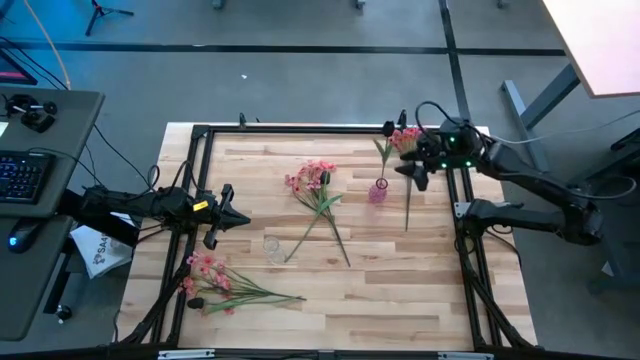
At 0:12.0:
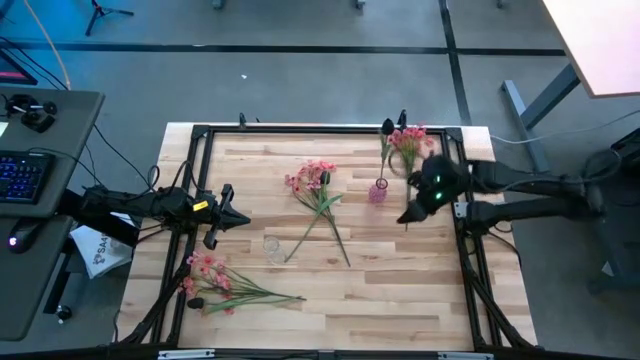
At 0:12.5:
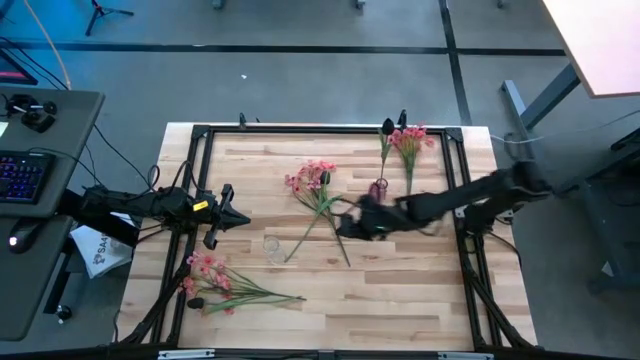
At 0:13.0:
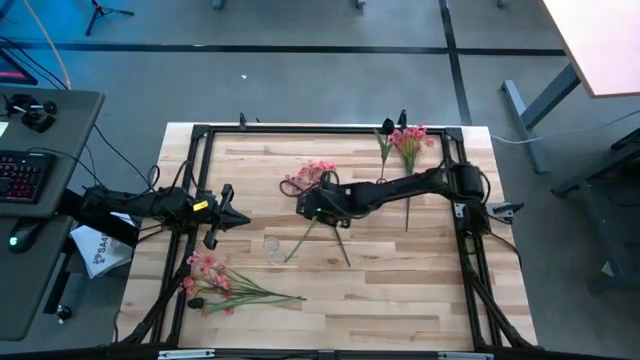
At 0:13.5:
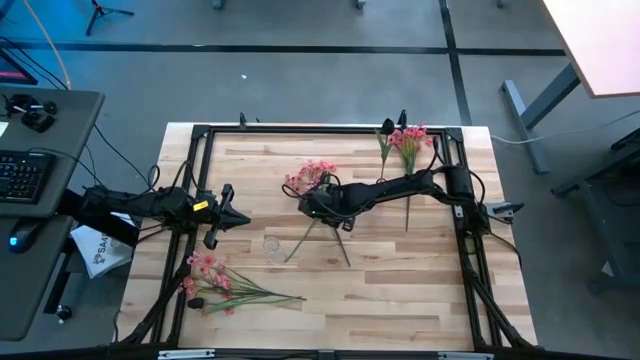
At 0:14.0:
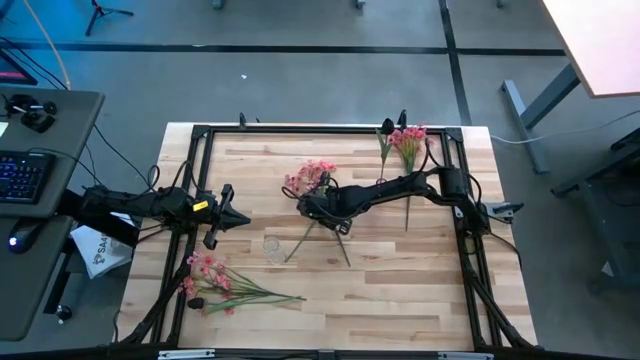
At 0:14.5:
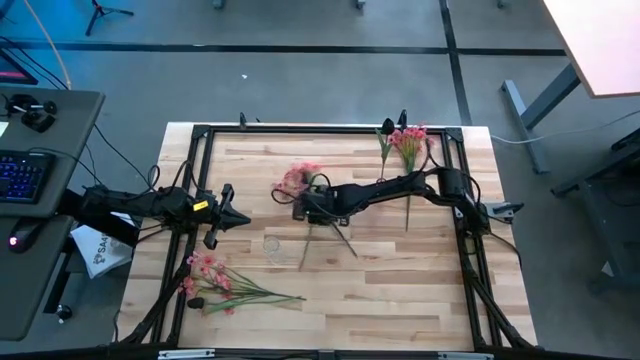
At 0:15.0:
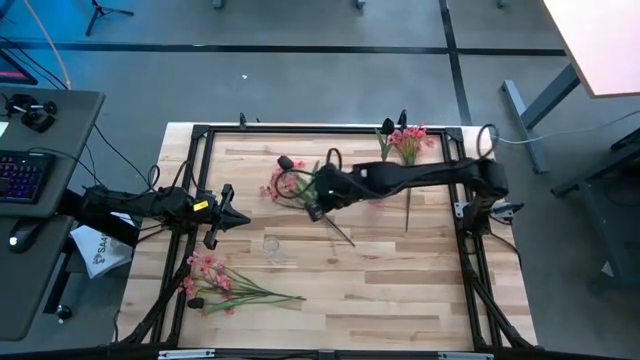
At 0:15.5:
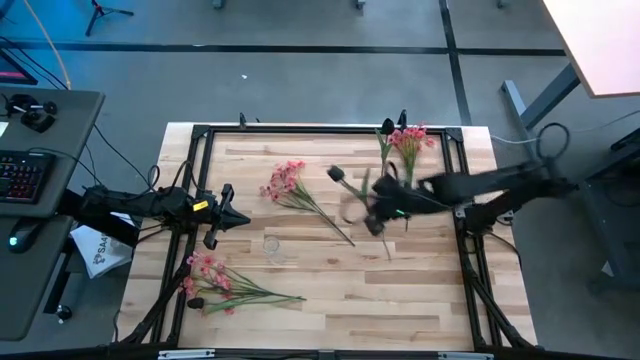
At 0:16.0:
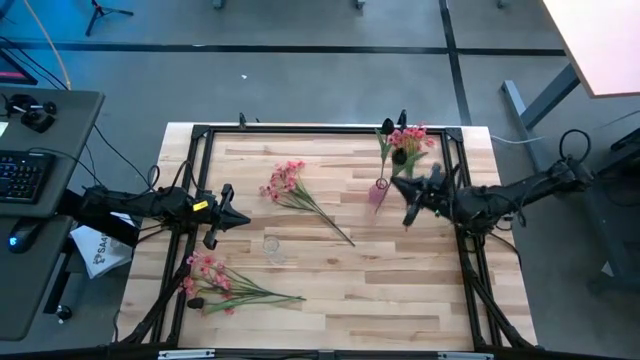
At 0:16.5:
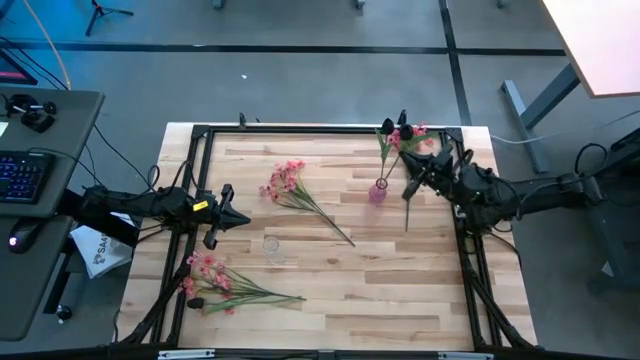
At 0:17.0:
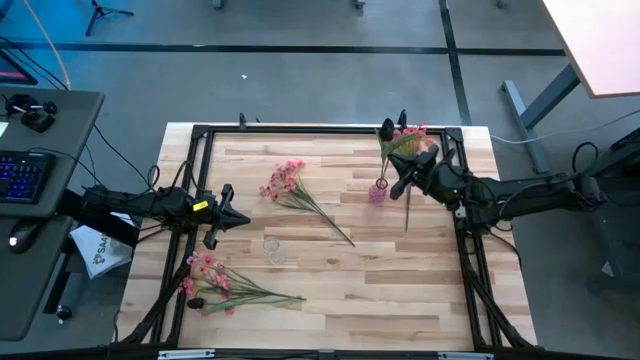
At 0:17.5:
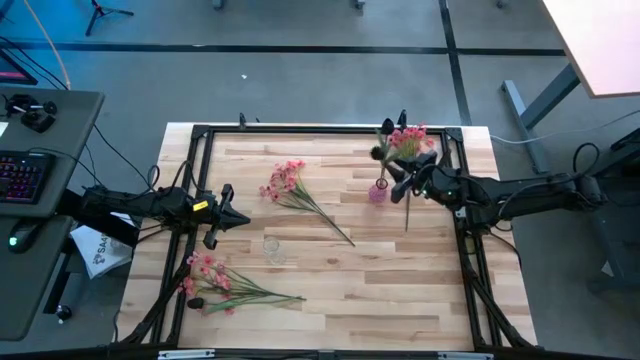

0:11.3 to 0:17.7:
Task: Sort flowers into vase by color
Put the center black tulip into the pink vase

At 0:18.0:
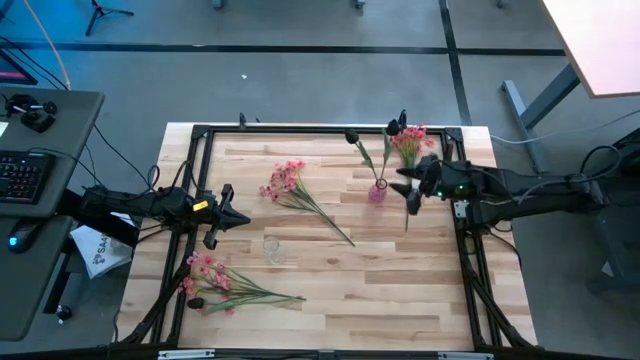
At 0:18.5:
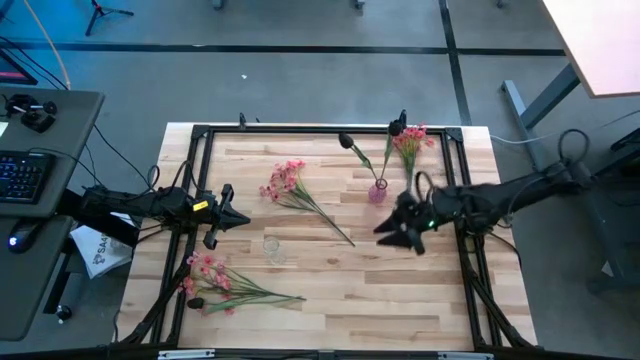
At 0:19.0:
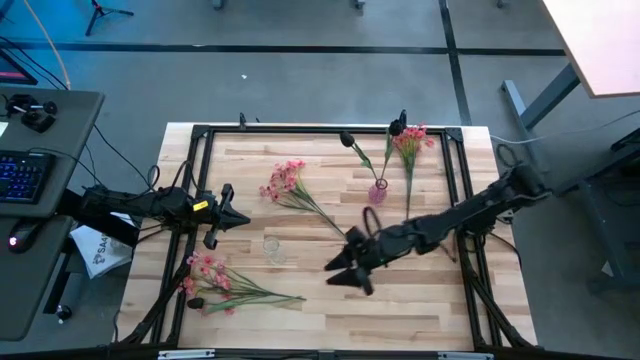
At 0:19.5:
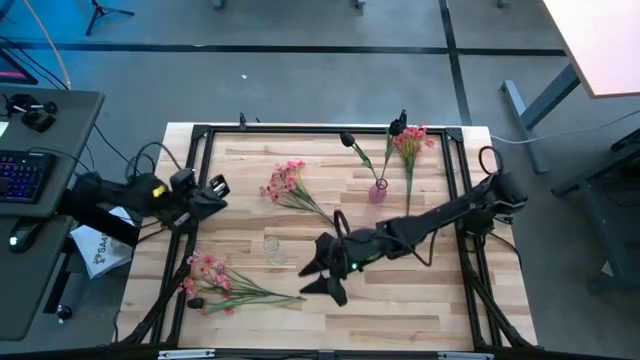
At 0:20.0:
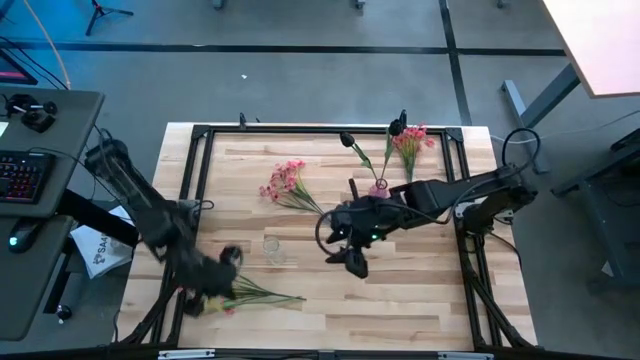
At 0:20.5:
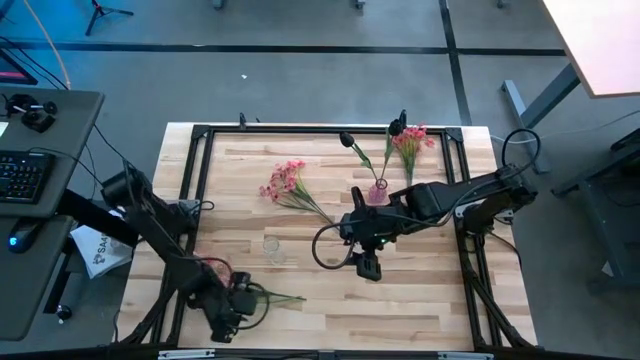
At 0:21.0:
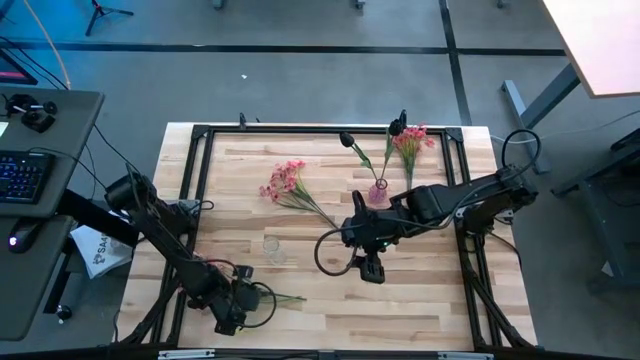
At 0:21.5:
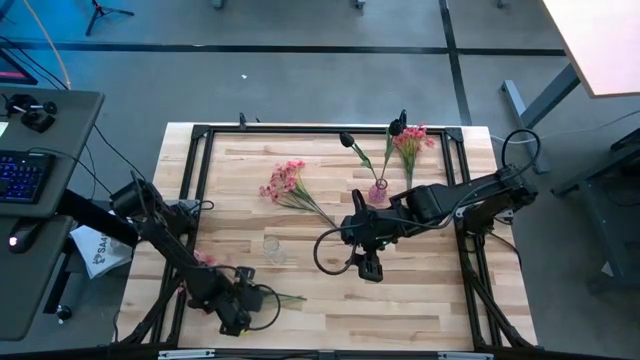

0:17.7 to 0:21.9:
Put the black tulip into the pink vase

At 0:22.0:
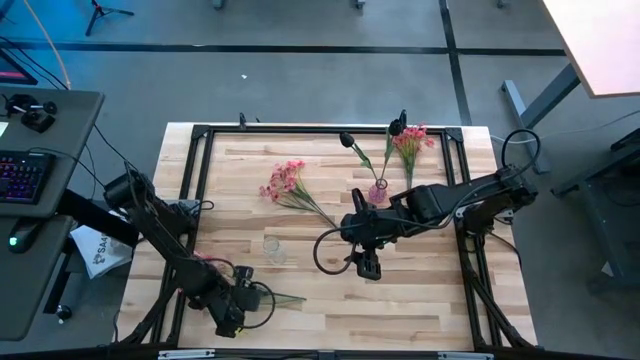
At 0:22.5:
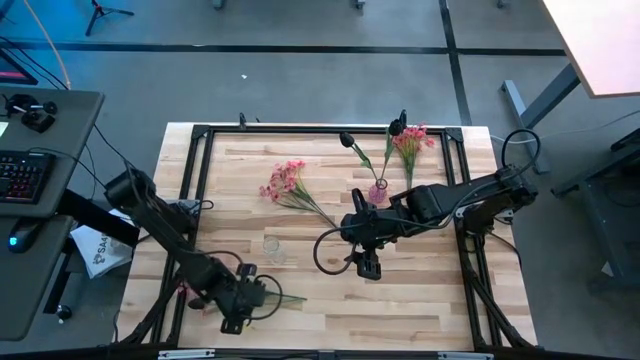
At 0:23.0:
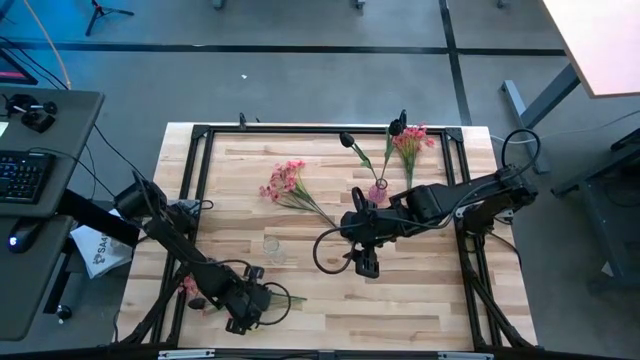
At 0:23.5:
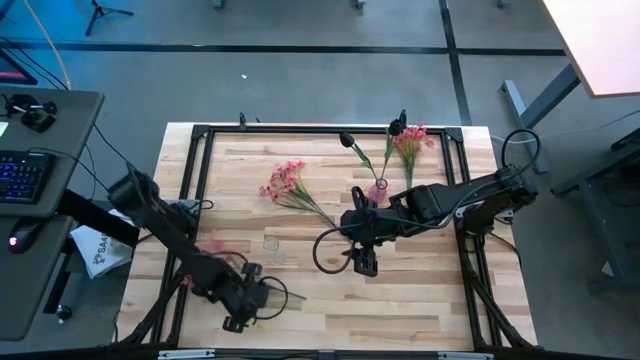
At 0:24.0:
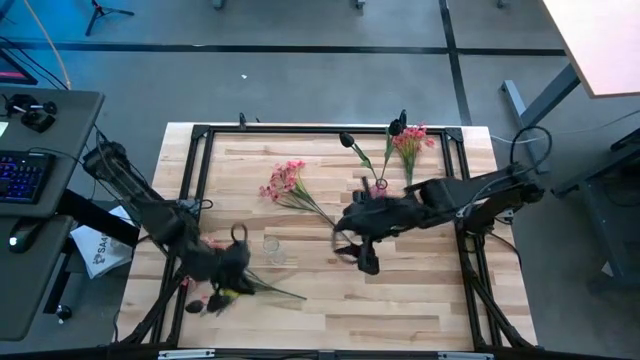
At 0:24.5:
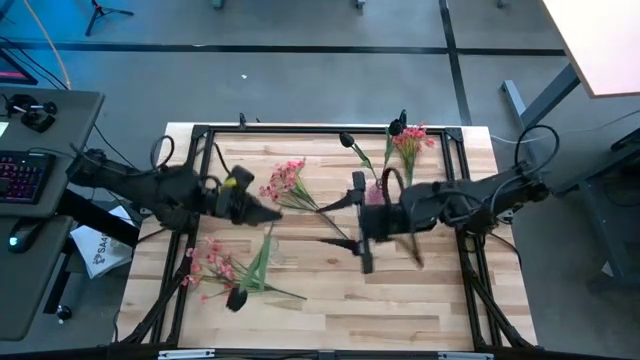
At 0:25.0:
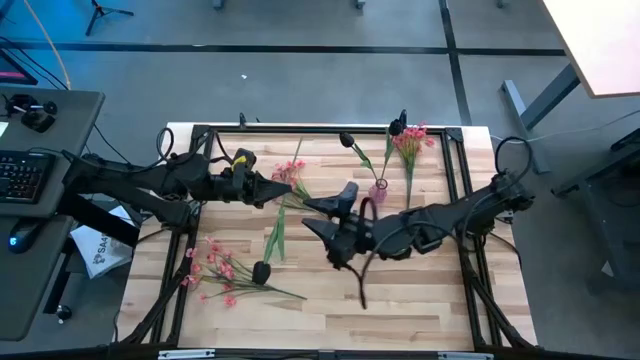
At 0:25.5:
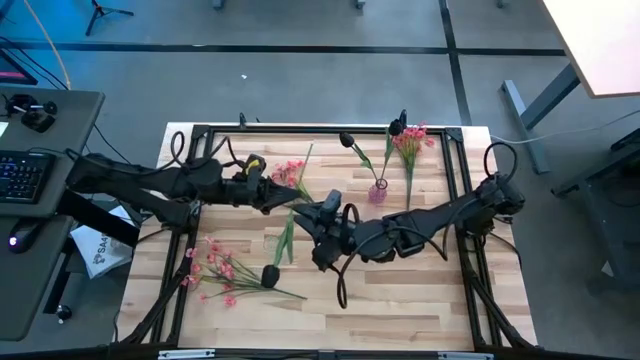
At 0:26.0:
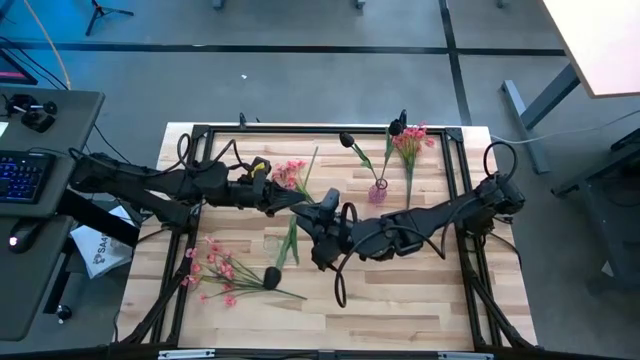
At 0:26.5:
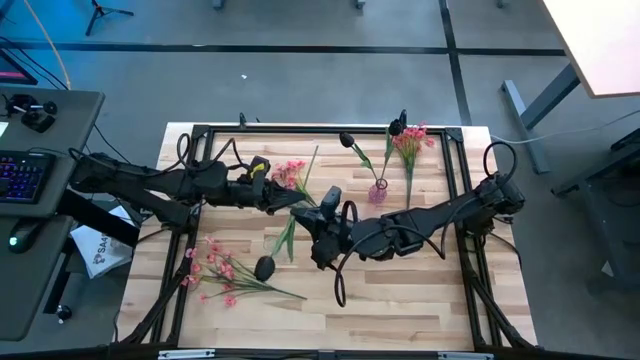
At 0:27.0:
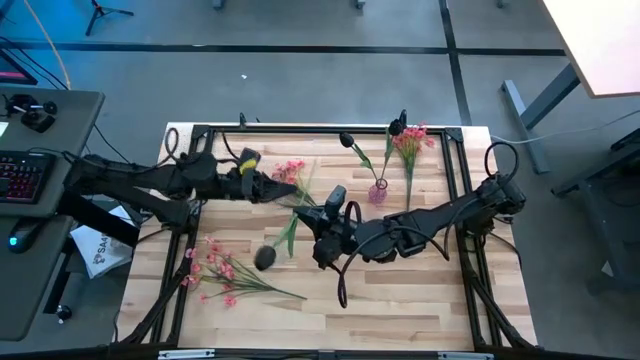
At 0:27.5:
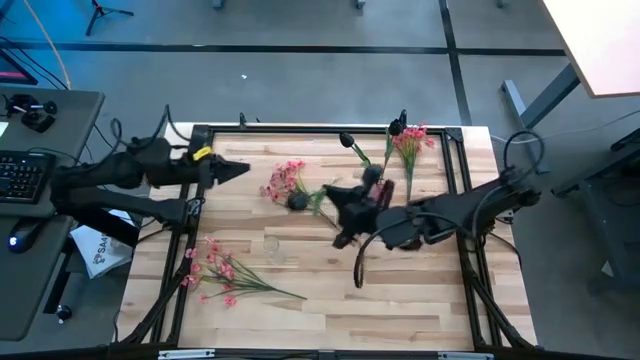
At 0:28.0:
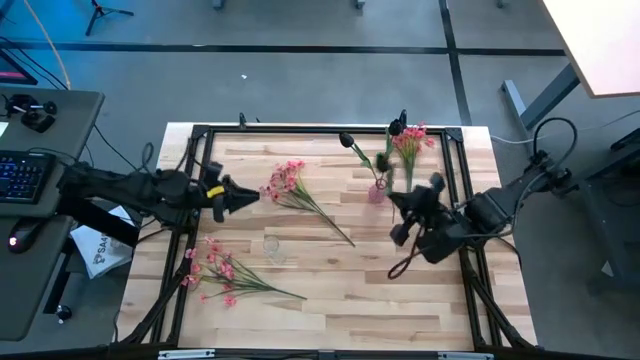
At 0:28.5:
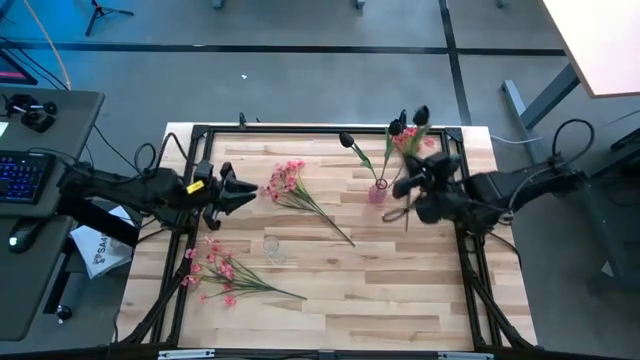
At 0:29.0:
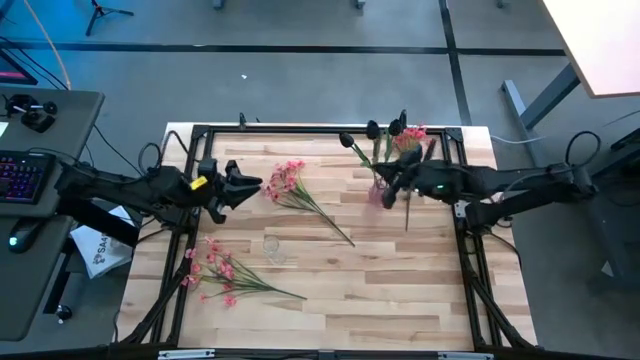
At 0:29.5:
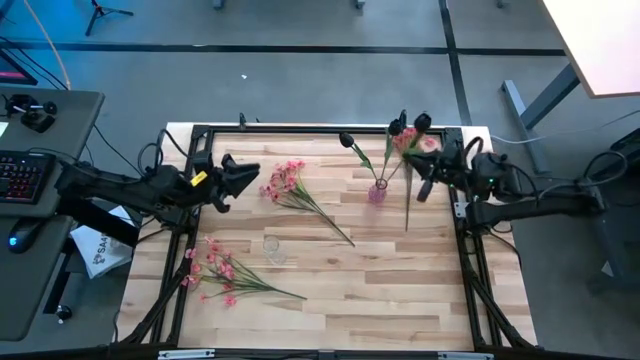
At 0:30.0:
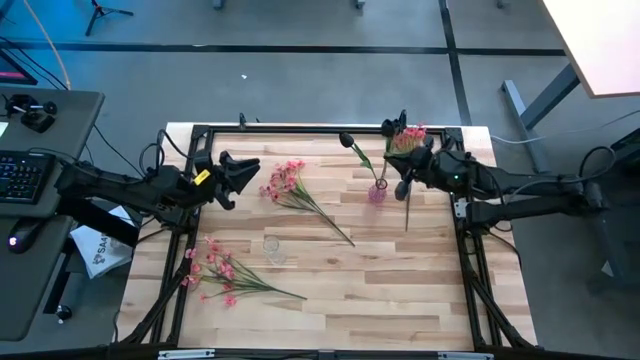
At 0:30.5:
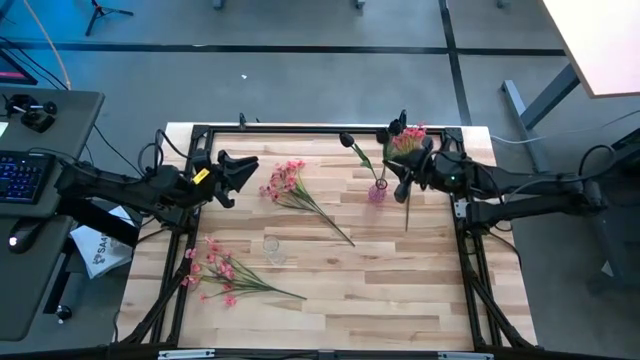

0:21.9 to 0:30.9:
Put the black tulip into the pink vase

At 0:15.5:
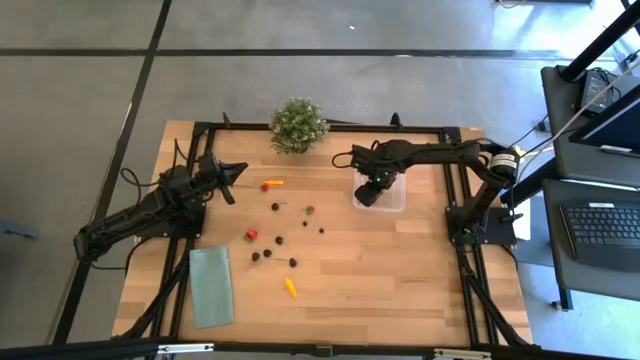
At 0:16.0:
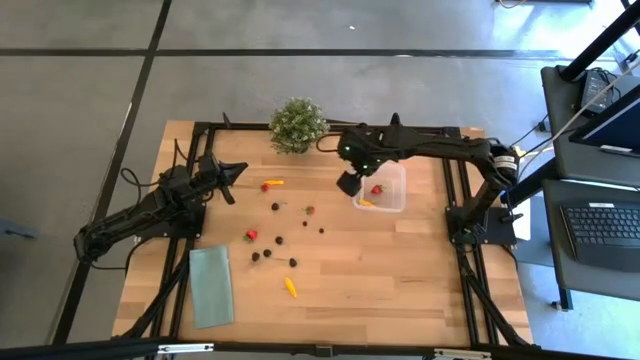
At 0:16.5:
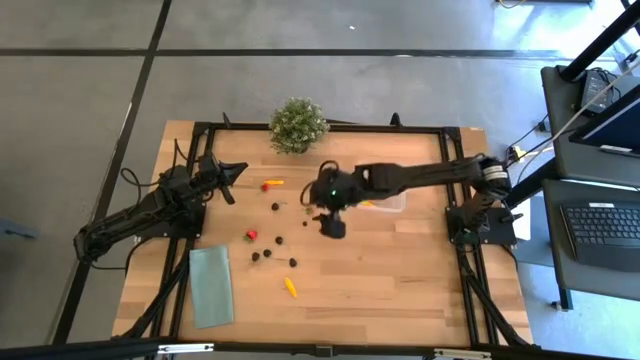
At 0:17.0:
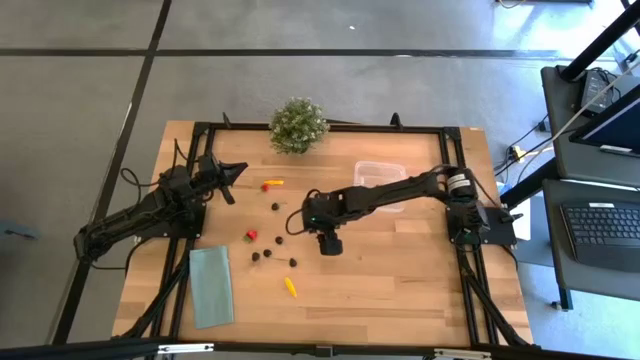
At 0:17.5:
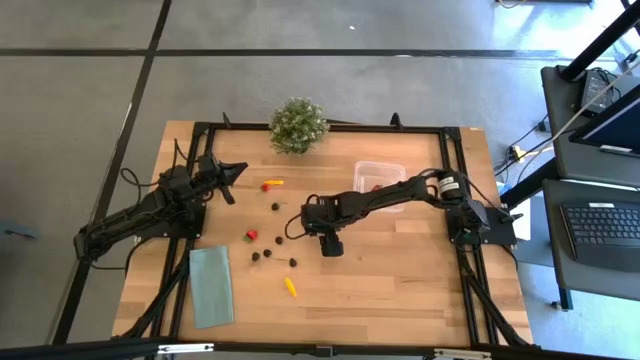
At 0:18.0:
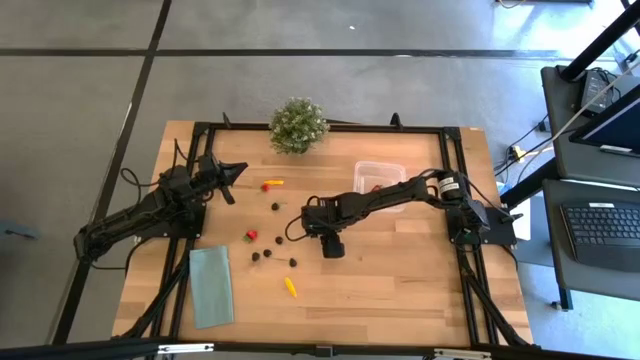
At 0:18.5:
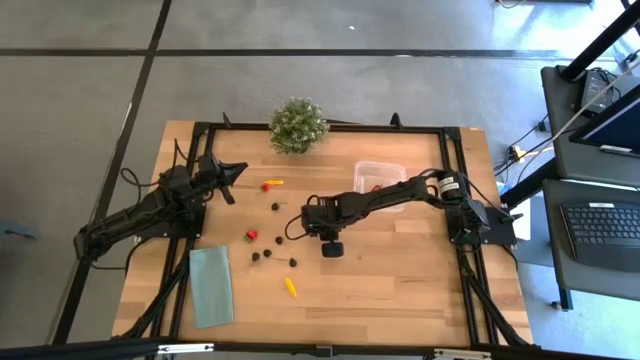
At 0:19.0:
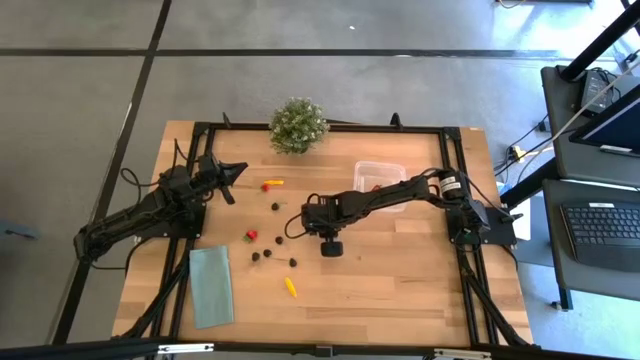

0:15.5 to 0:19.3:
Task: Pick and placing Produce into tupperware
Put the right blueberry into the transparent bin
